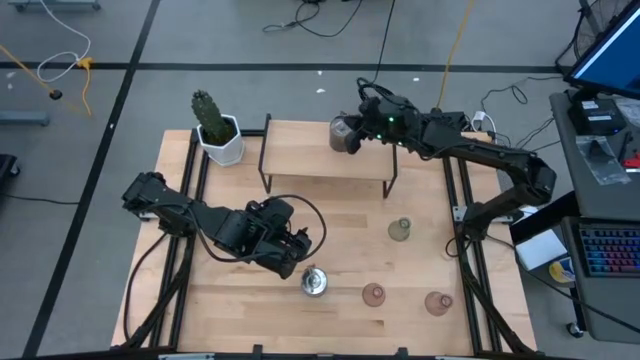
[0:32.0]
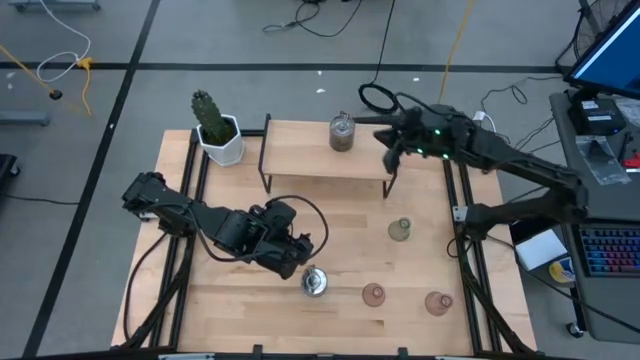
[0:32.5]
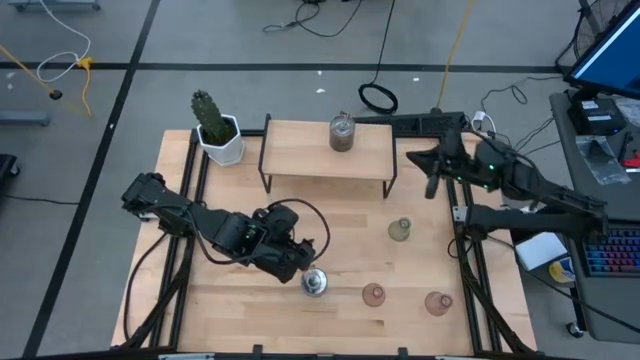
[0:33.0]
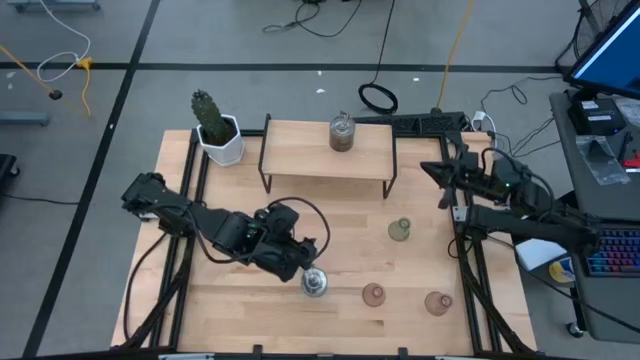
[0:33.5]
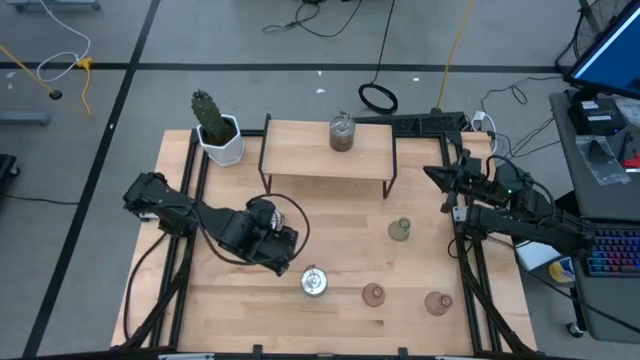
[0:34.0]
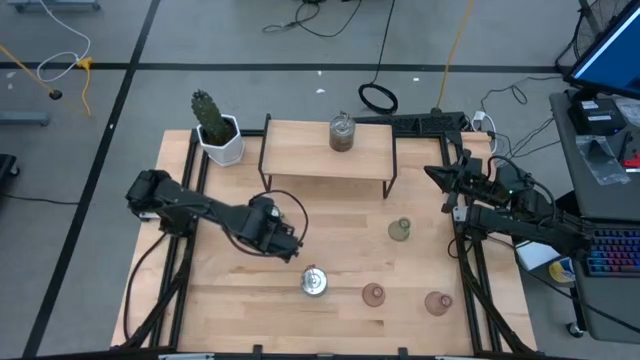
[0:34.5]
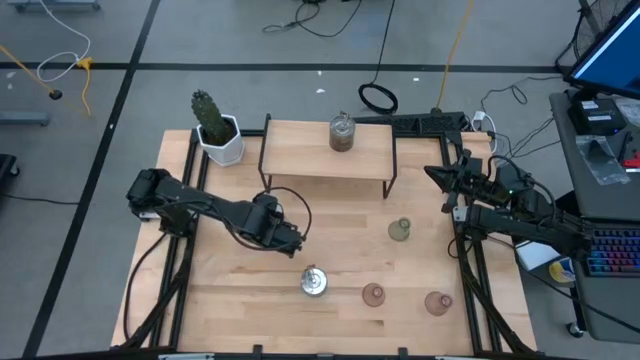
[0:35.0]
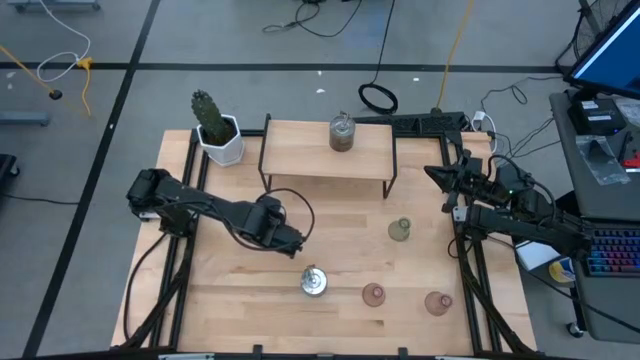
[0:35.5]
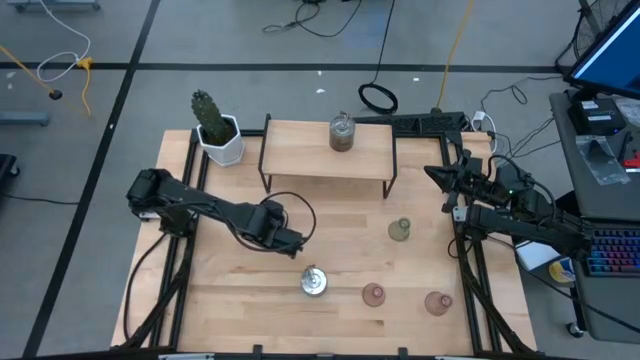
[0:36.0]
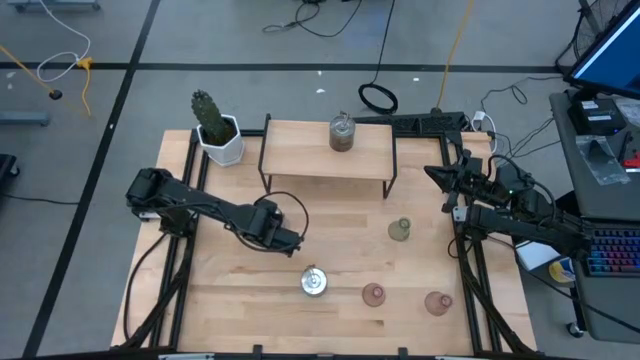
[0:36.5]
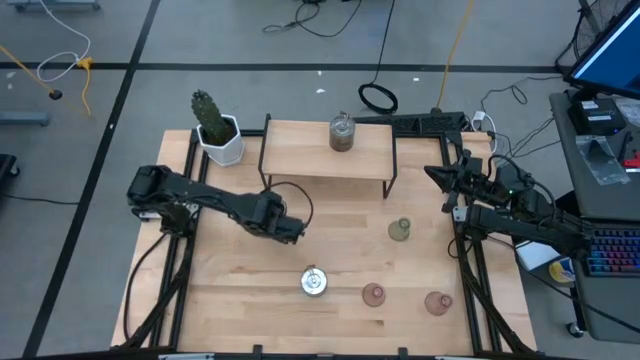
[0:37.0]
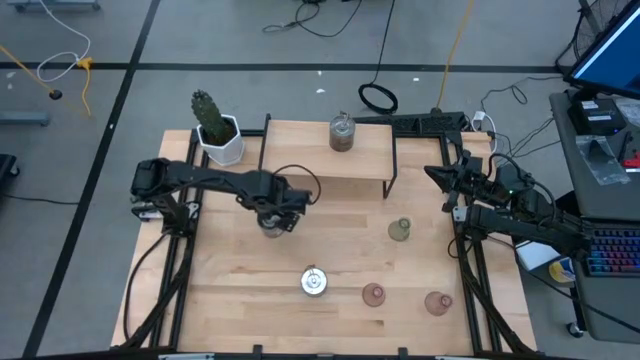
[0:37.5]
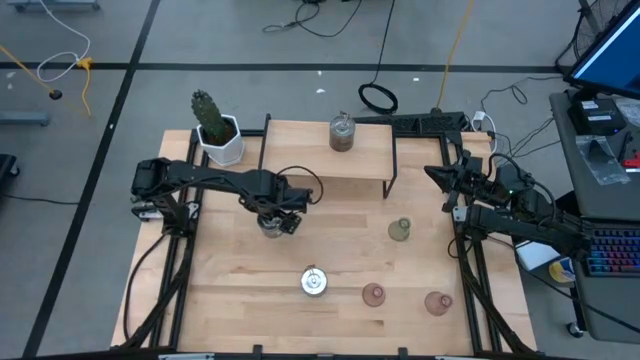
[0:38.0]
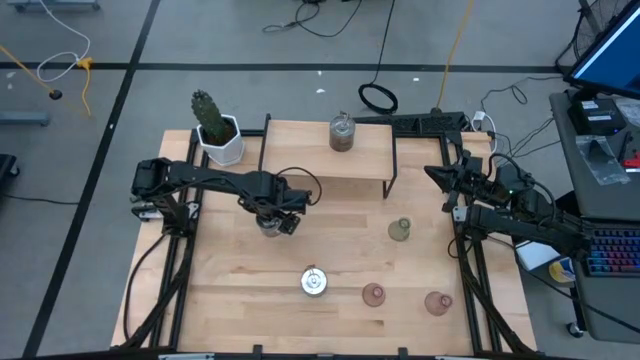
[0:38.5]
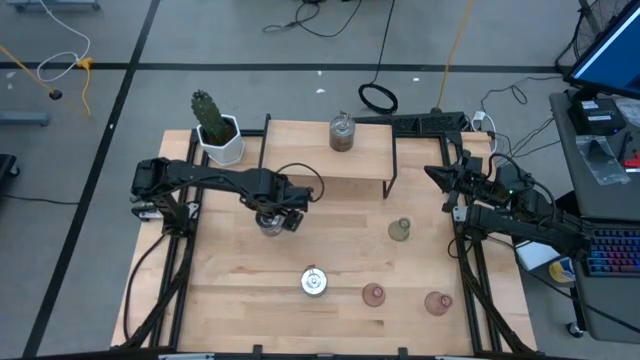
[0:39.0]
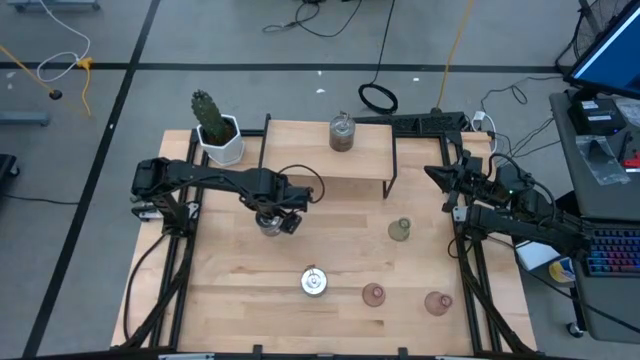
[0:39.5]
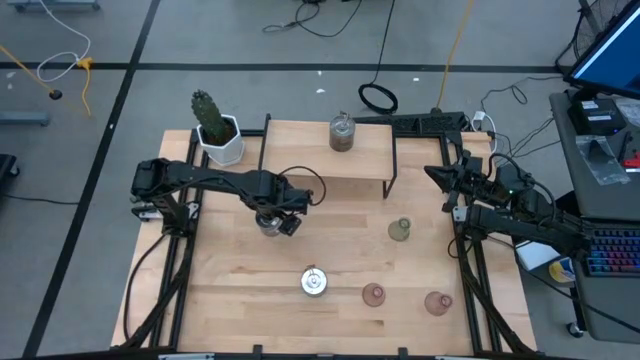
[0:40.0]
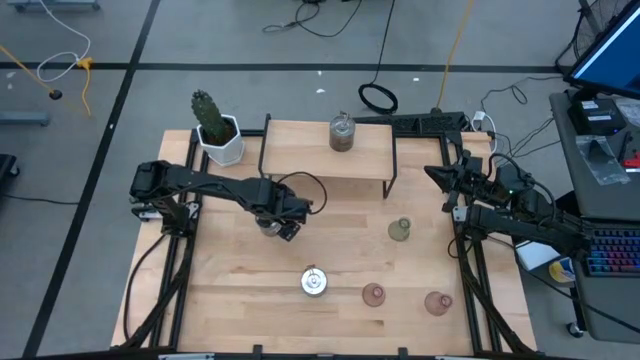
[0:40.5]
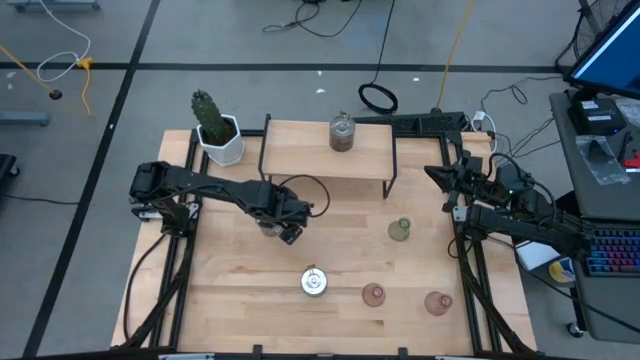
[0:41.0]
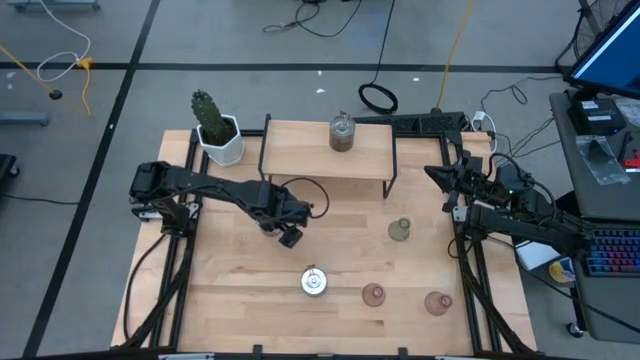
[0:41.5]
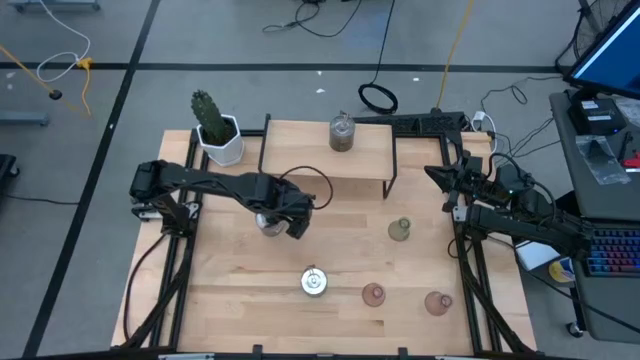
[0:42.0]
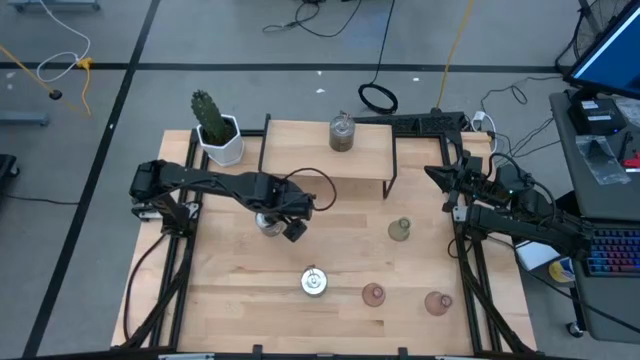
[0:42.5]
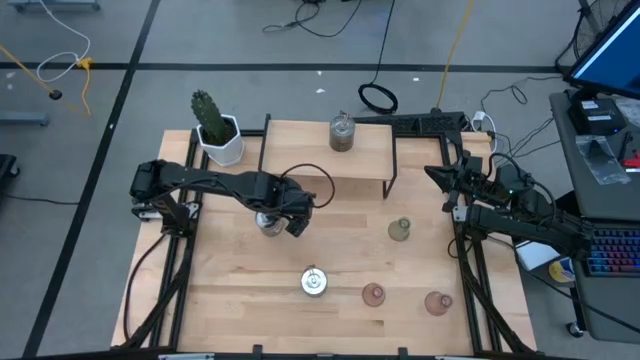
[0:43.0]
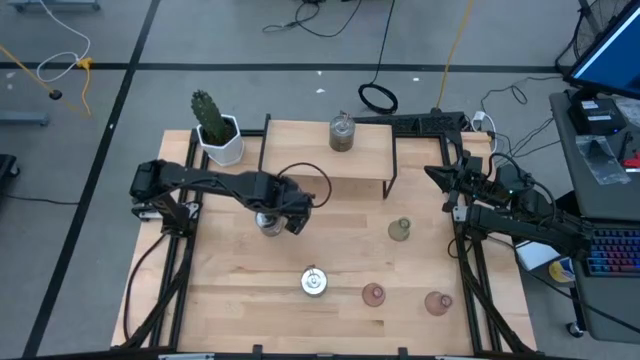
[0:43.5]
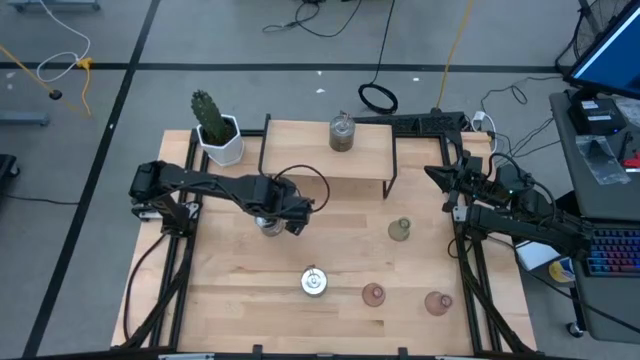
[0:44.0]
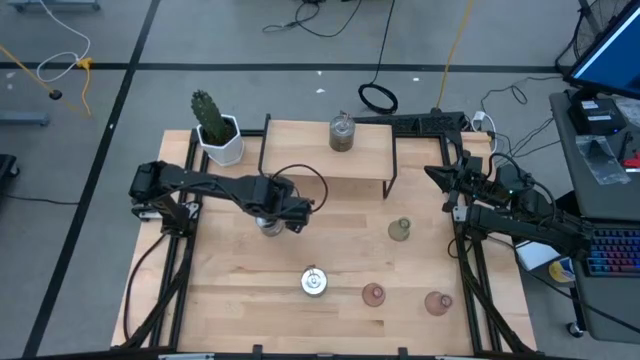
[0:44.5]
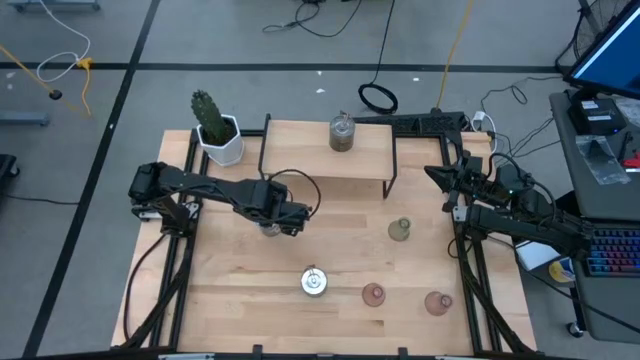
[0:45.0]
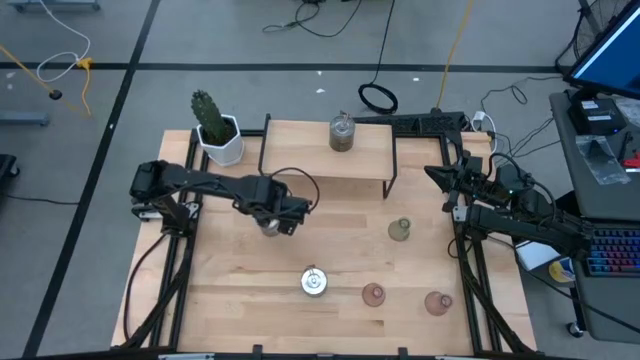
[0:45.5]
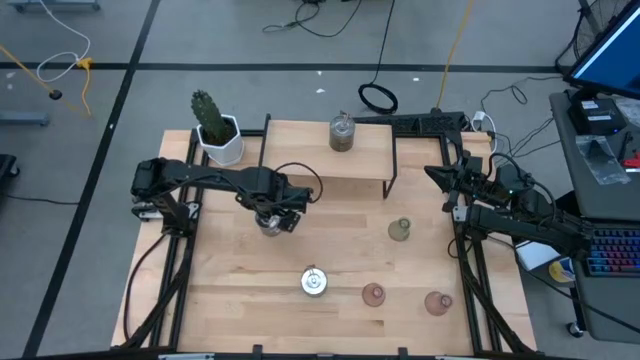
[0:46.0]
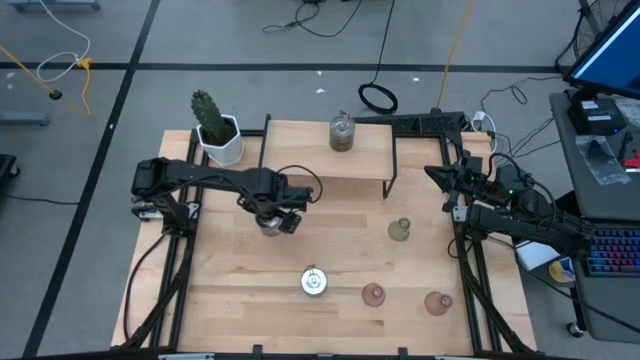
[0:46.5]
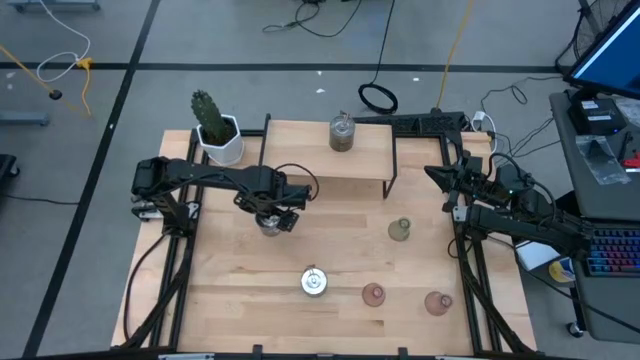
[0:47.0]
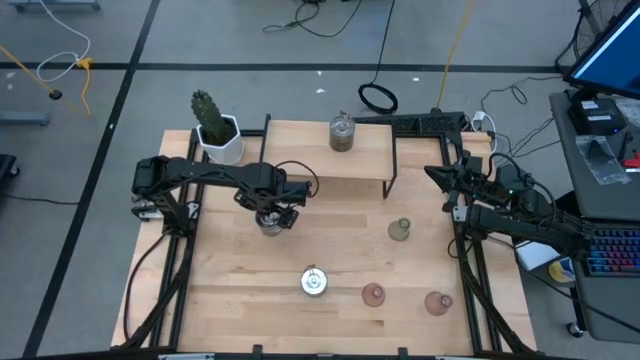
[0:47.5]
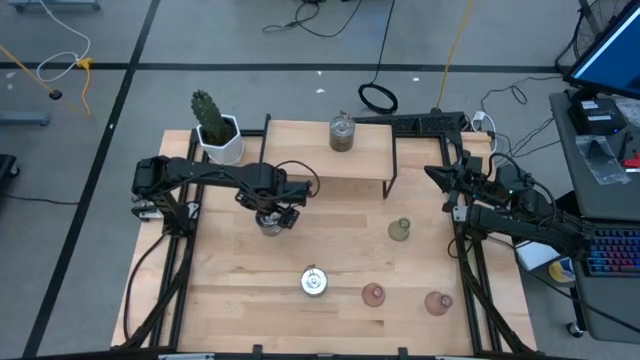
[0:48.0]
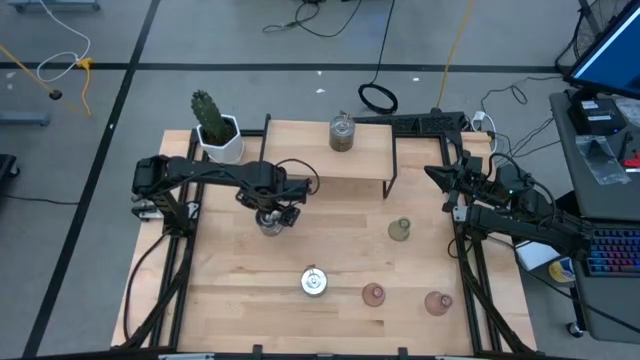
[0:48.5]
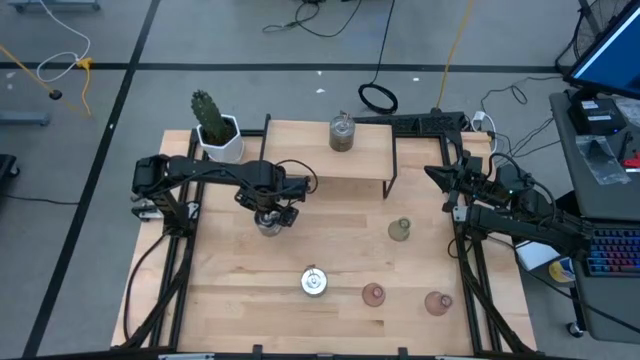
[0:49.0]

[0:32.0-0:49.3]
Task: Pick & Place candle stick holders
Put the top silver scented candle on the shelf

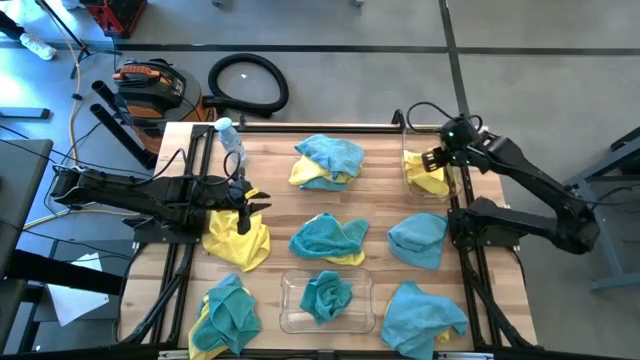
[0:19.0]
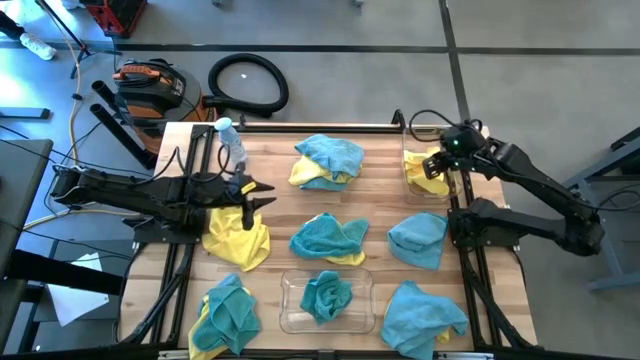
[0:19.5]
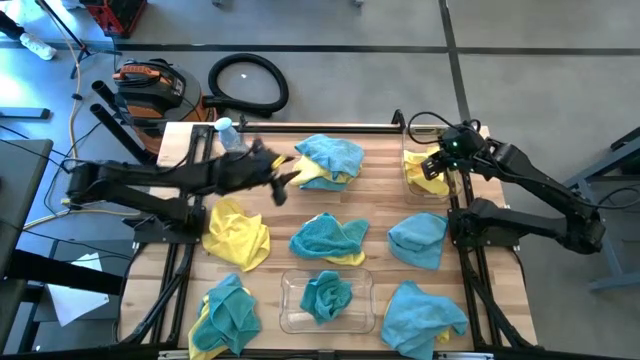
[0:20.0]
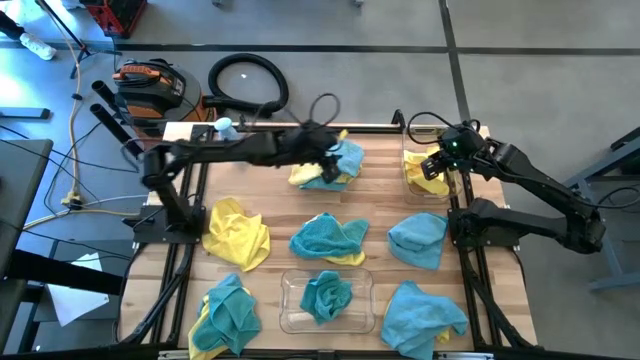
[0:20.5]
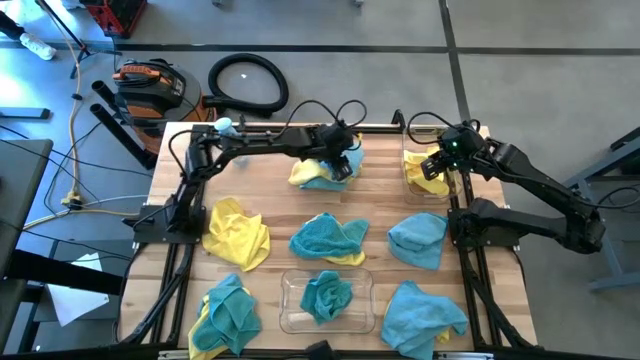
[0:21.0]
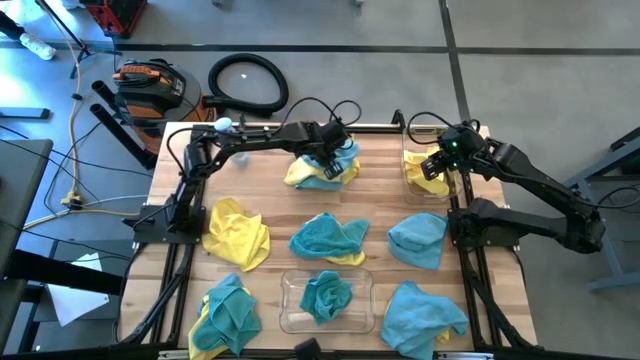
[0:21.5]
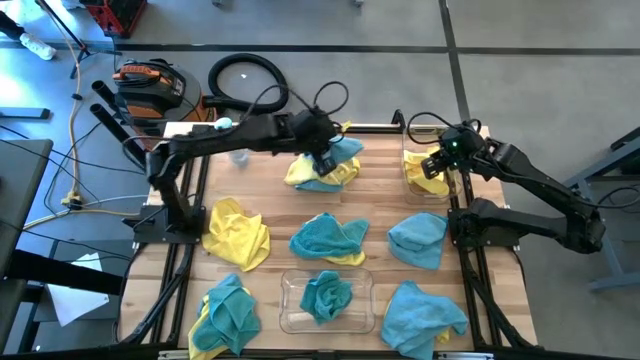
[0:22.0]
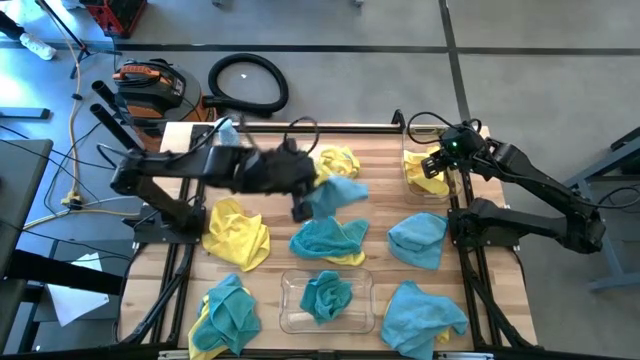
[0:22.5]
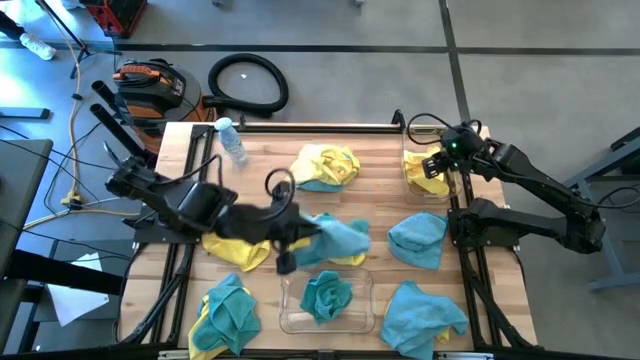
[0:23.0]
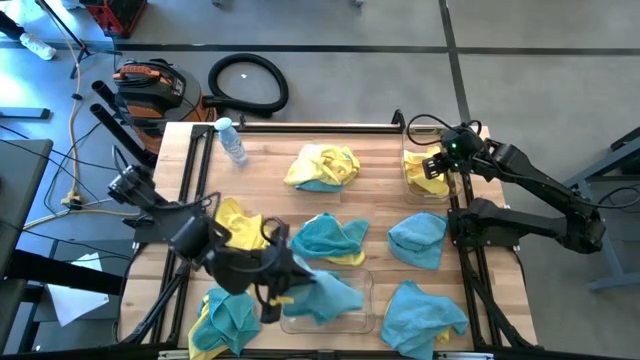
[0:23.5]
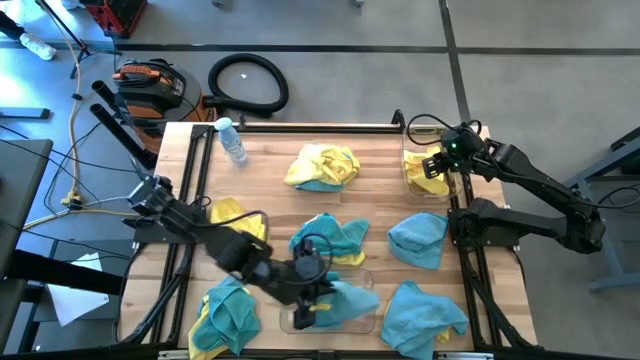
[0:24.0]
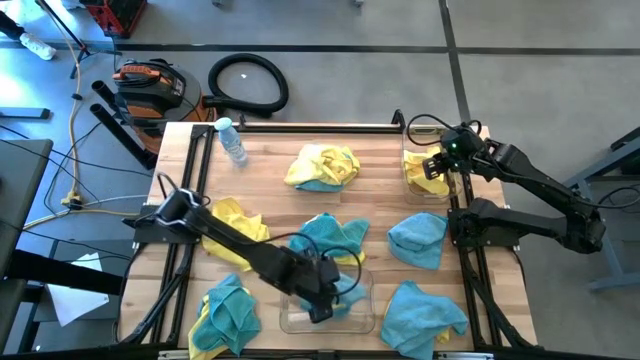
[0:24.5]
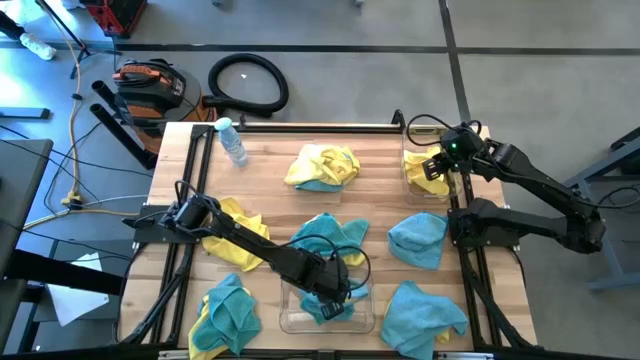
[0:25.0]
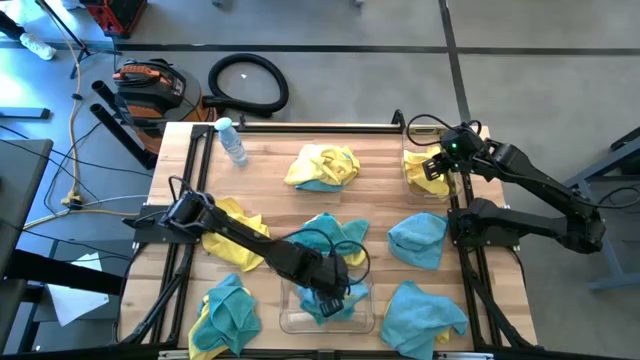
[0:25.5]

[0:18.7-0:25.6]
Task: Sort microfiber towel by color & place in baskets
Put the blue microfiber towel into the bottom transparent bin
